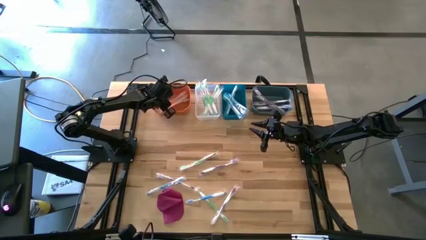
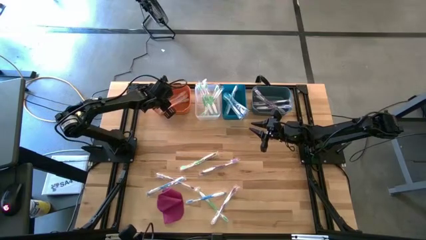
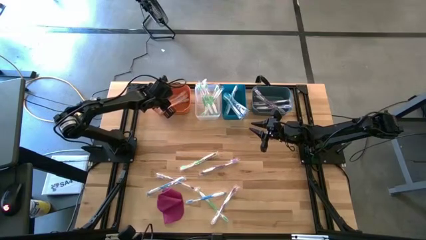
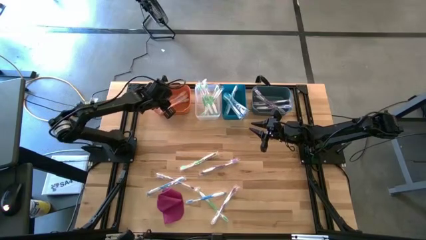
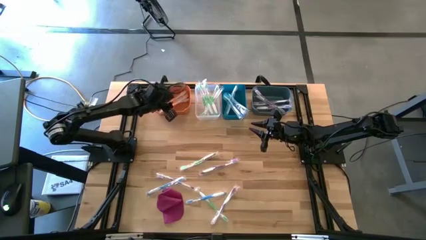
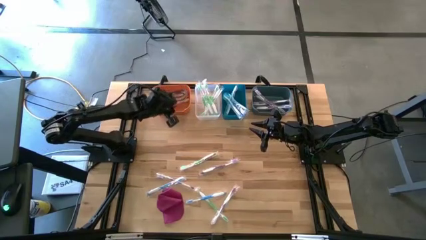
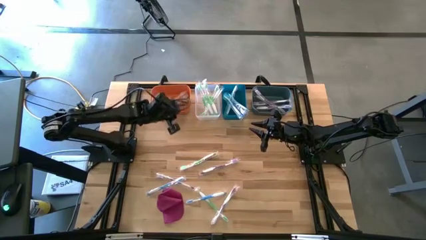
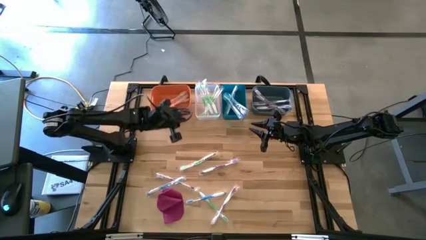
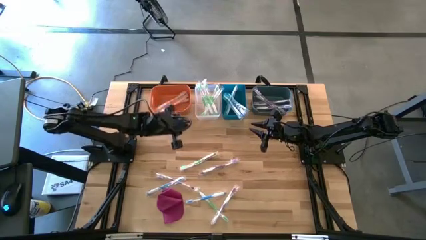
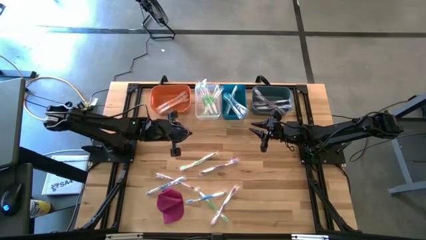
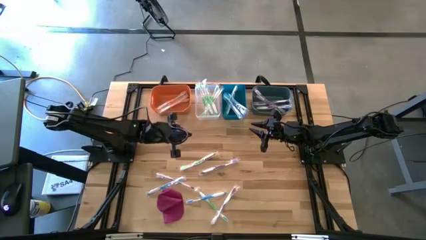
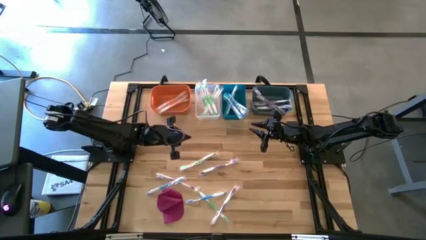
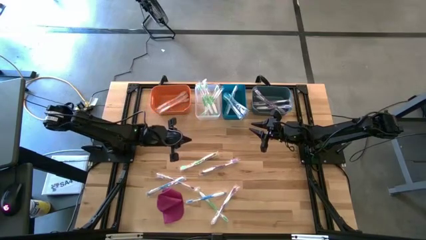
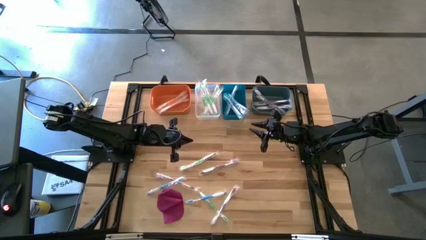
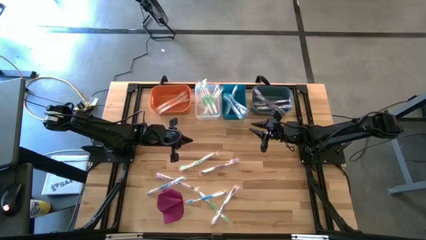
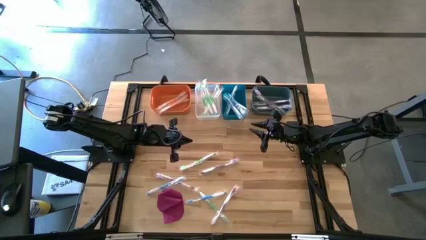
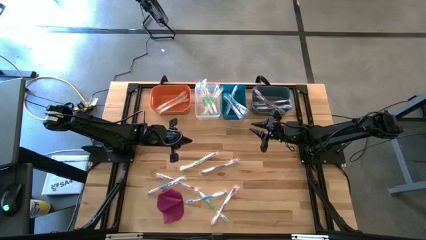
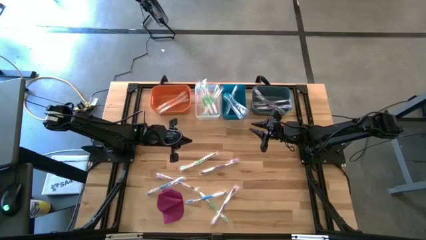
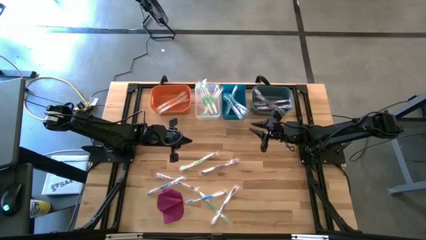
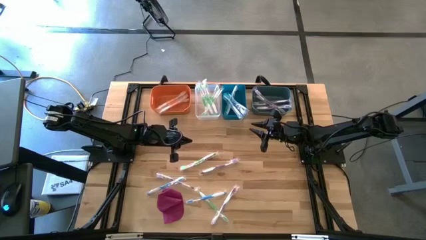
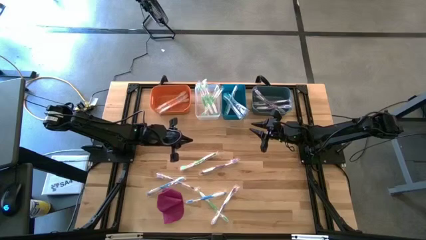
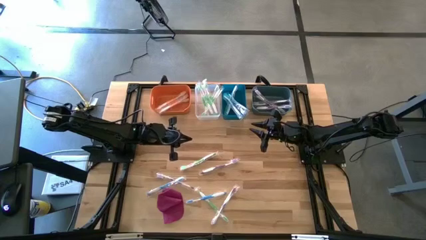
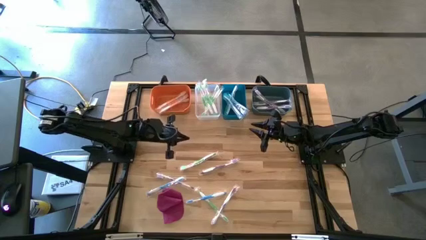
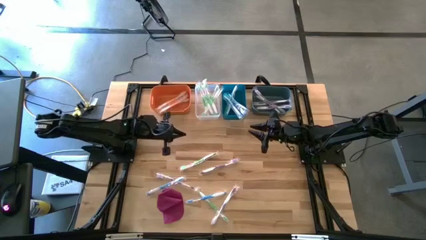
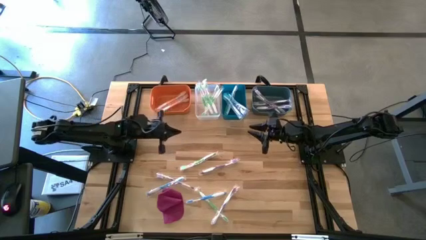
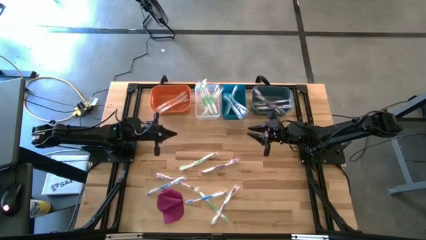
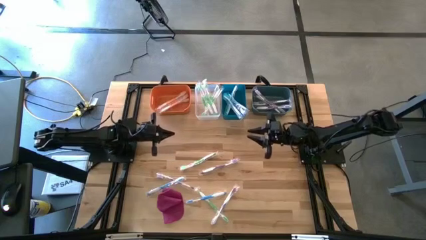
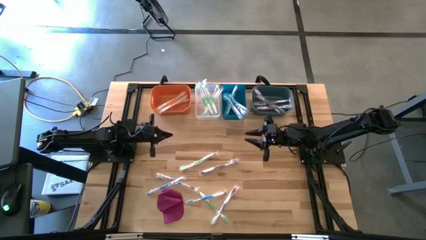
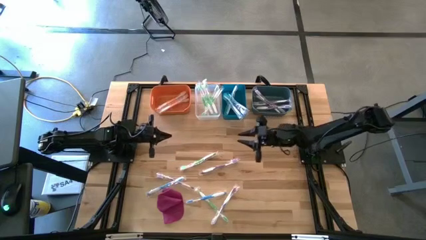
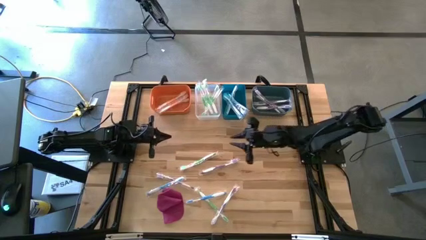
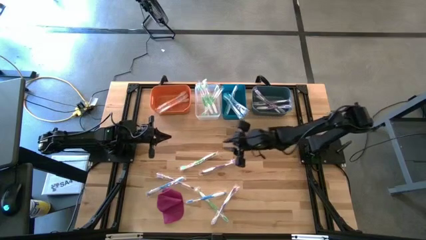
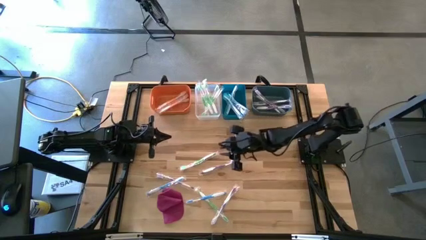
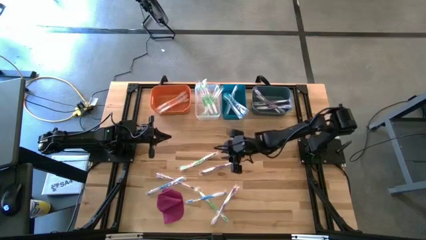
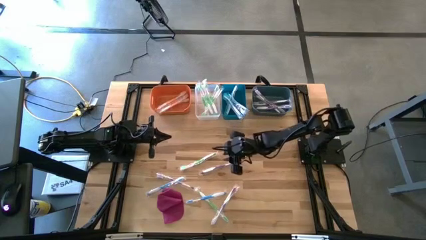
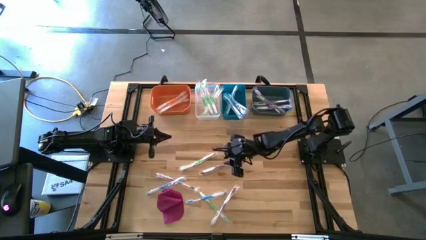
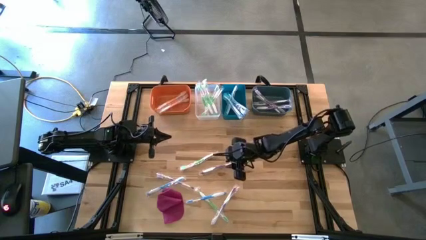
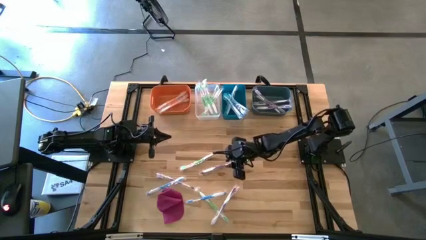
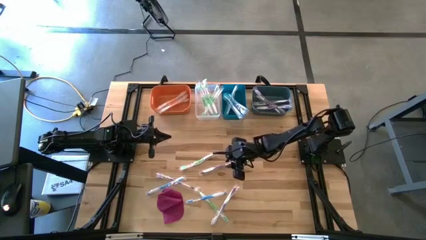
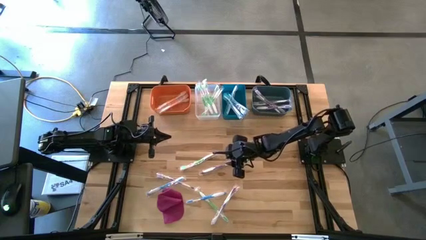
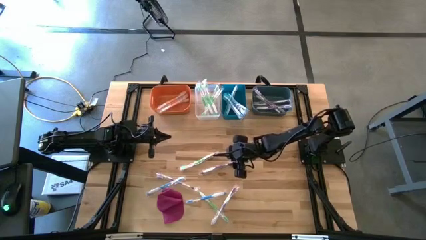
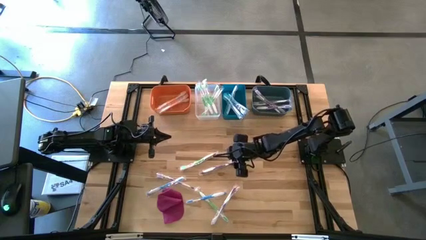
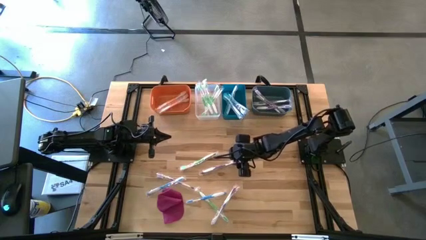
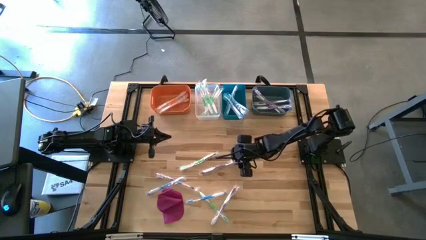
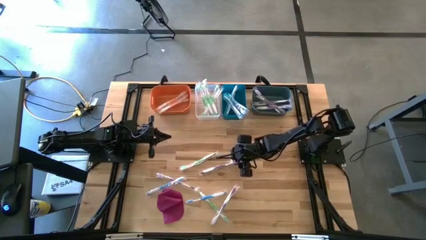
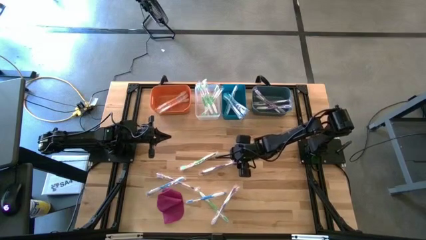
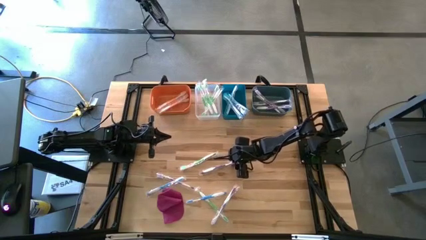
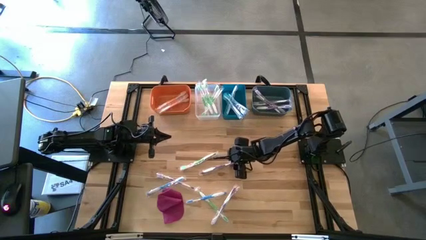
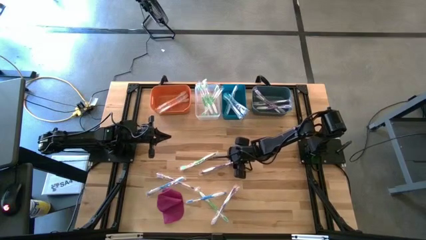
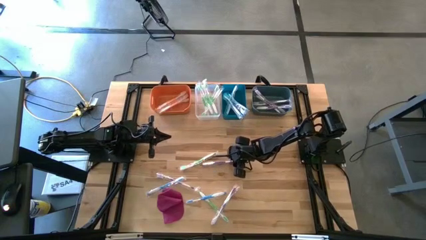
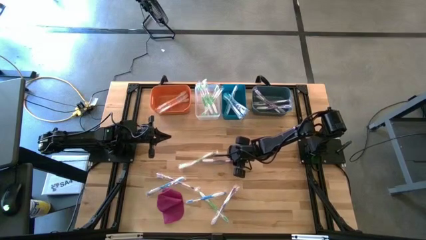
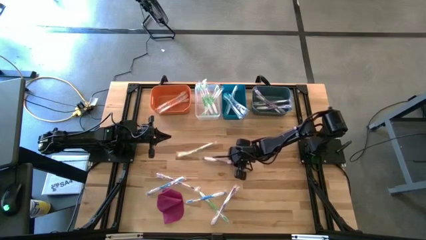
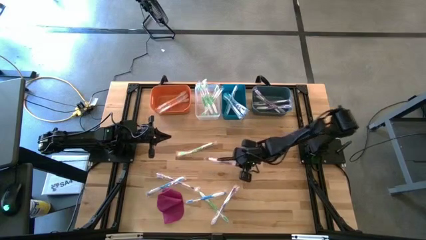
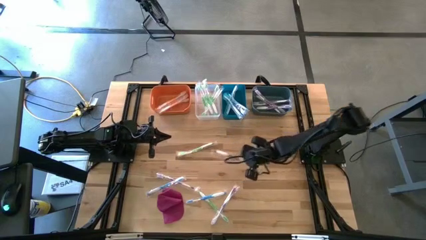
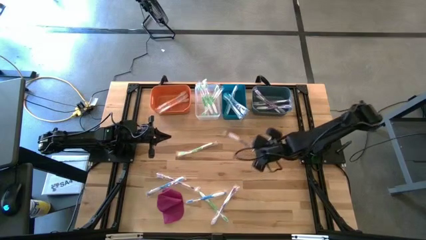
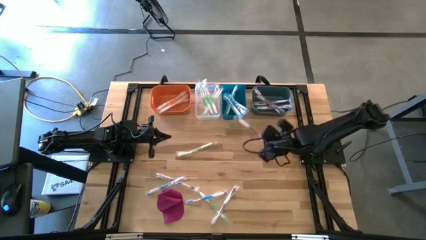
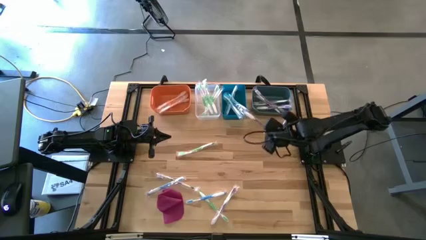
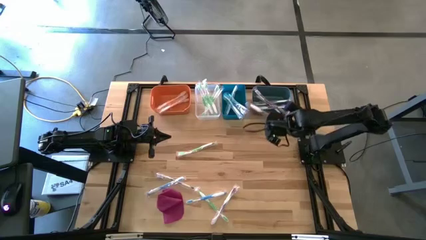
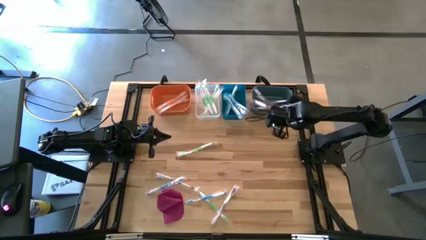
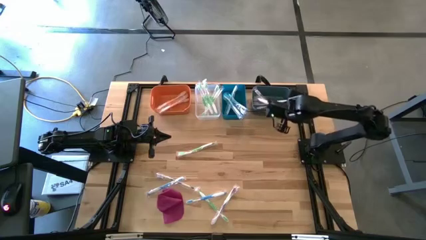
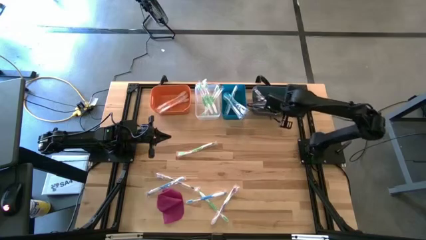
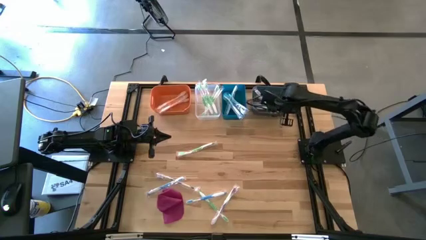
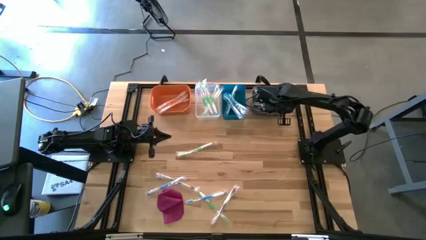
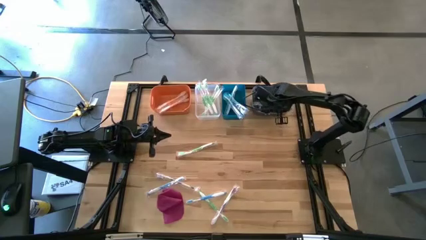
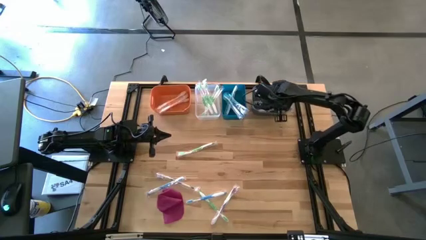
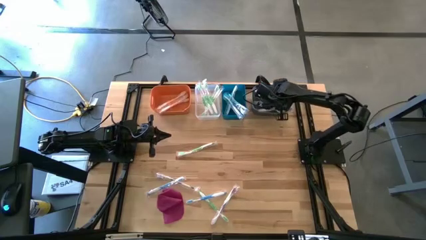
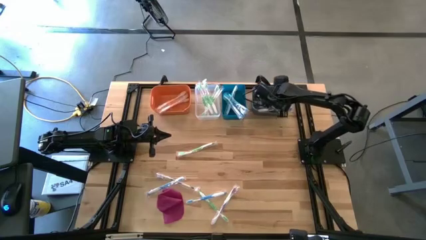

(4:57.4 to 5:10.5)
Task: Pick & Place Toothbrushes
Put the purple toothbrush into the green bin
